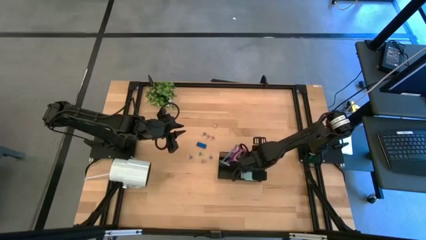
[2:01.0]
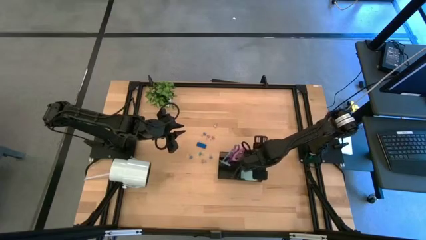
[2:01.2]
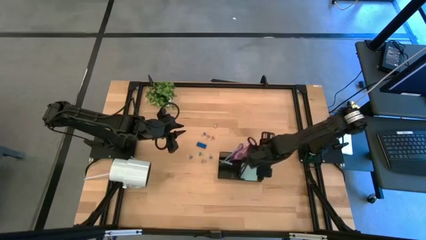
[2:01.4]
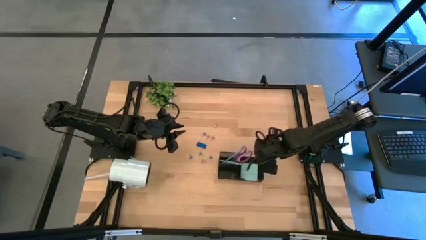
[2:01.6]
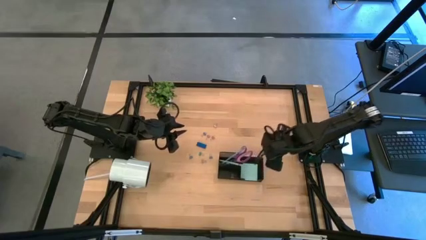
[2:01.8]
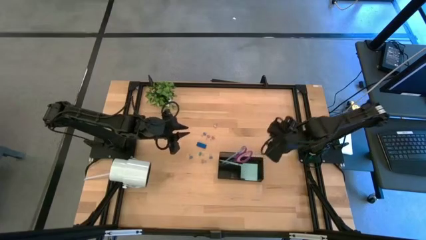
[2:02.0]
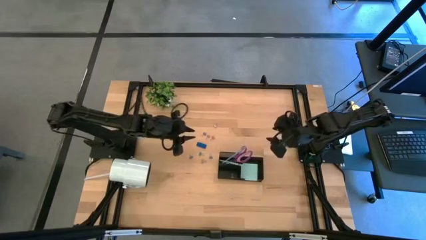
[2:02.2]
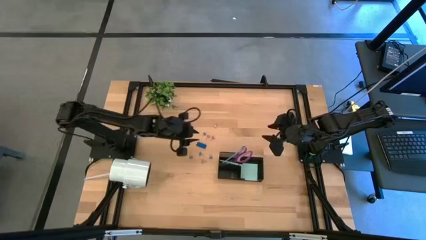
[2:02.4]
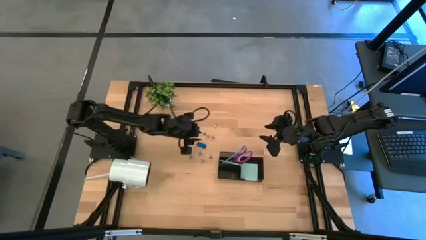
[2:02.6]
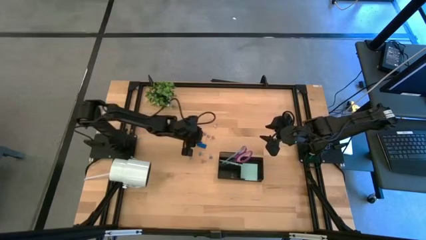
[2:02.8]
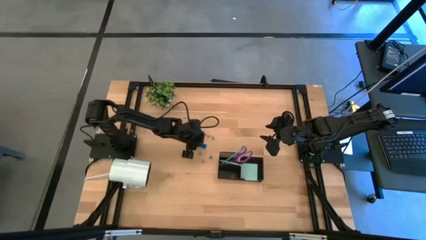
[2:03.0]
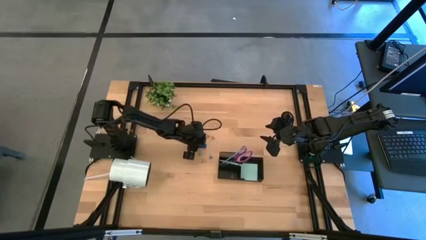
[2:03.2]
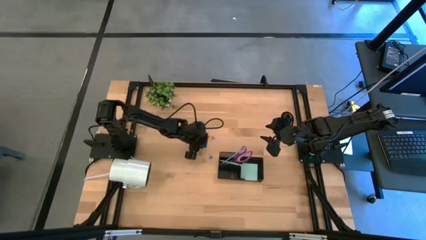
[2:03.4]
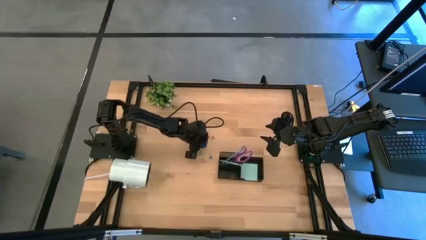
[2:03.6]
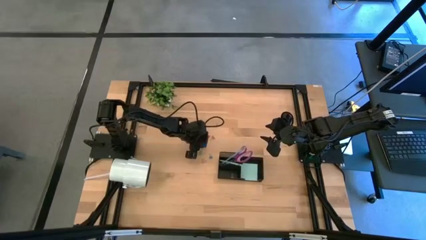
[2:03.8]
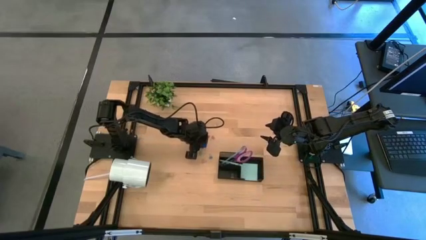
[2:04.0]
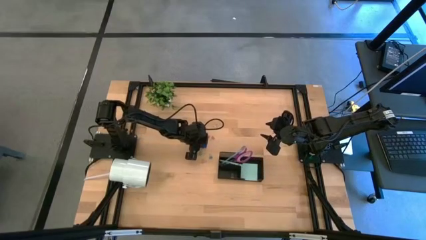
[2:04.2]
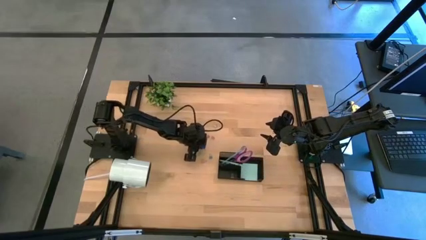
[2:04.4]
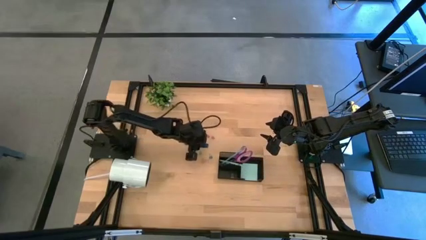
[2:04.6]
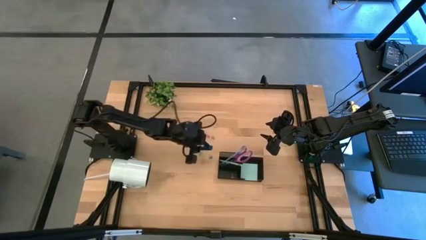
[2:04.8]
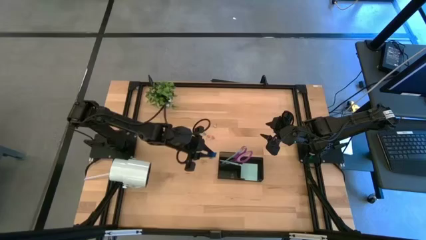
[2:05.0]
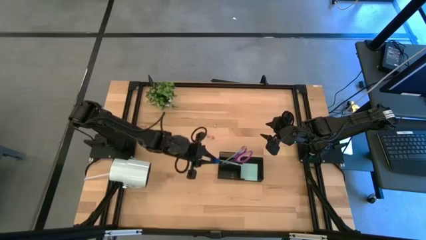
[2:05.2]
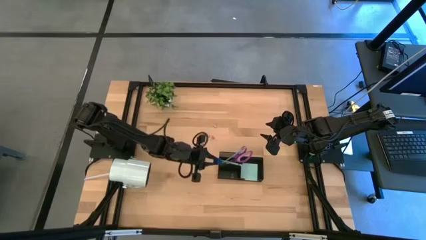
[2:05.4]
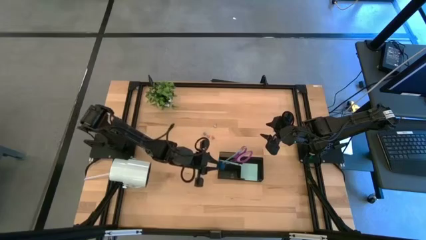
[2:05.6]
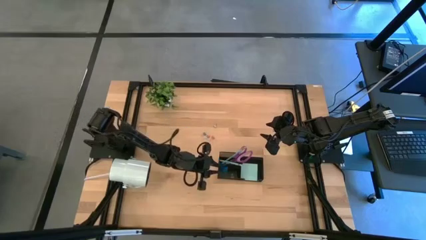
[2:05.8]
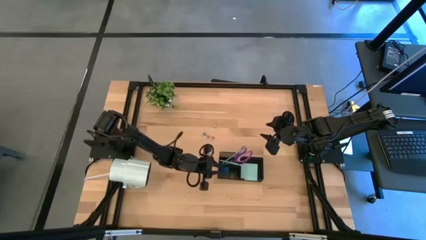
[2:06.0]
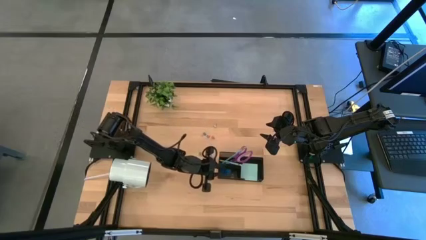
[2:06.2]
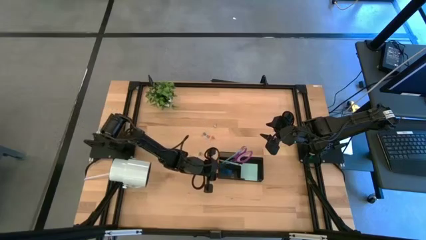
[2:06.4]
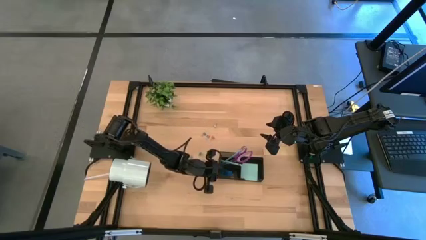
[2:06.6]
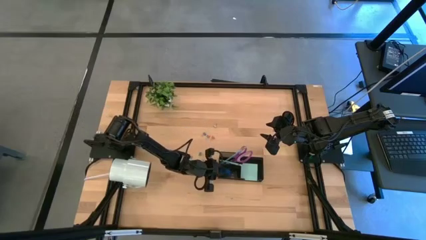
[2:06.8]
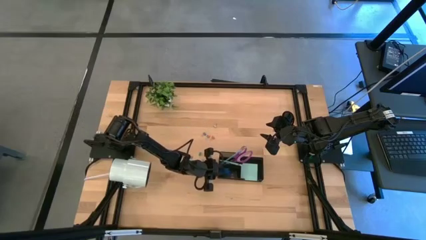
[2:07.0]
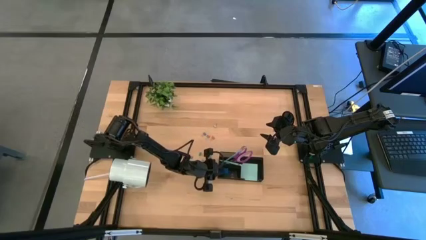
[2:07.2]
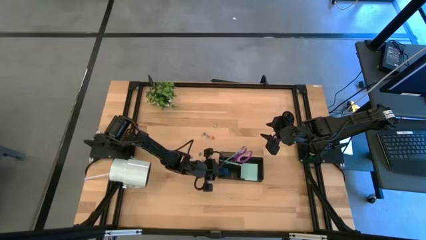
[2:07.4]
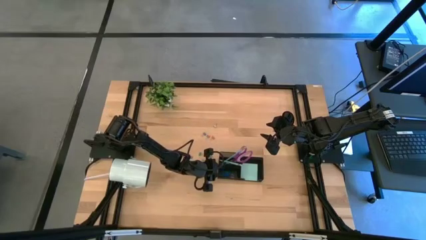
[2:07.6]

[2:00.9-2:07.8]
Task: Pick and place office supplies into organizer
Put the blue eraser into the desk organizer

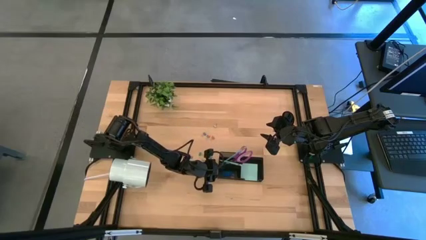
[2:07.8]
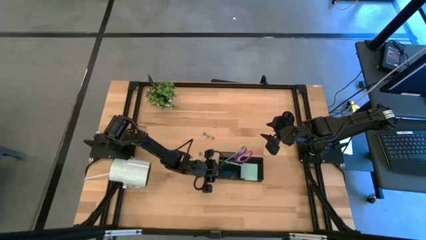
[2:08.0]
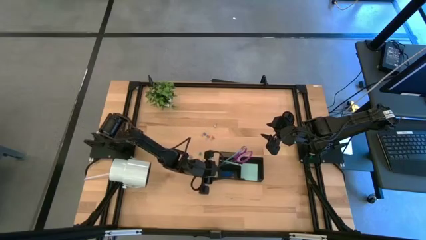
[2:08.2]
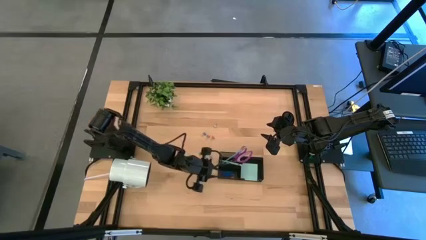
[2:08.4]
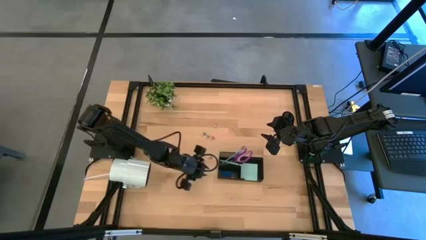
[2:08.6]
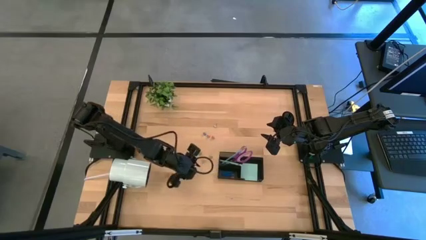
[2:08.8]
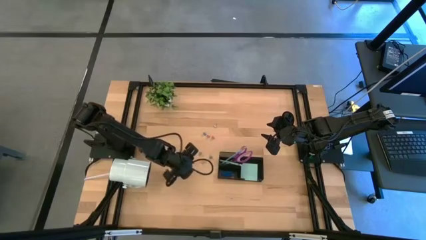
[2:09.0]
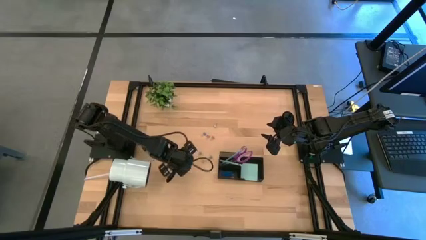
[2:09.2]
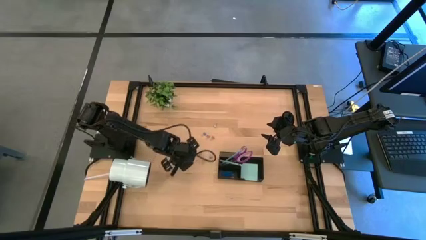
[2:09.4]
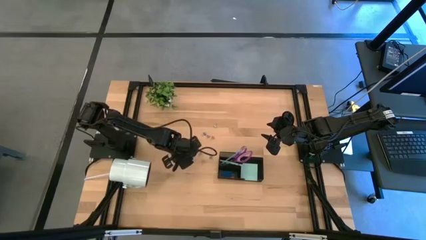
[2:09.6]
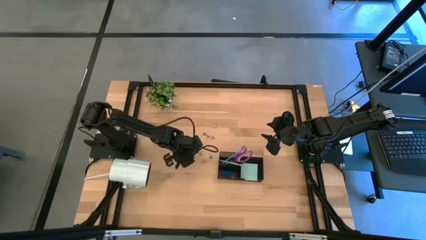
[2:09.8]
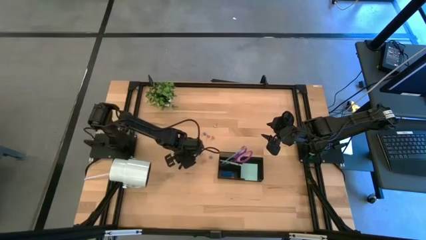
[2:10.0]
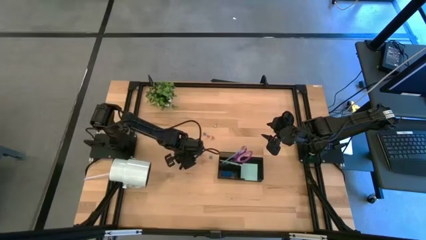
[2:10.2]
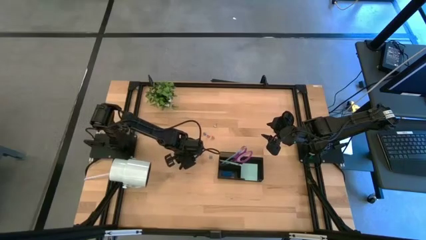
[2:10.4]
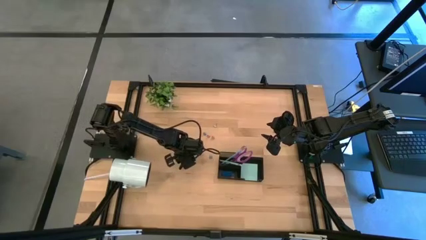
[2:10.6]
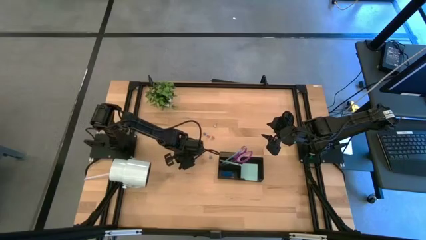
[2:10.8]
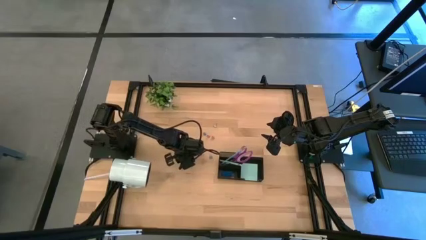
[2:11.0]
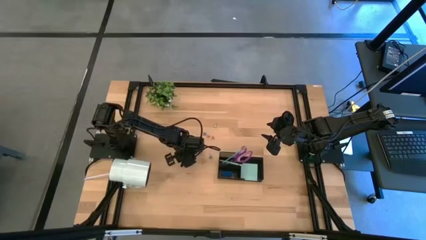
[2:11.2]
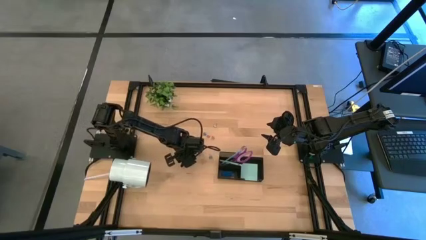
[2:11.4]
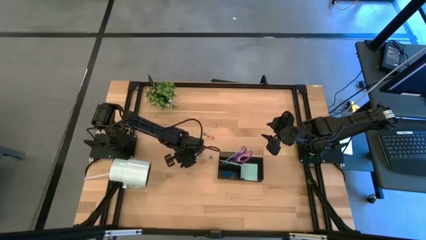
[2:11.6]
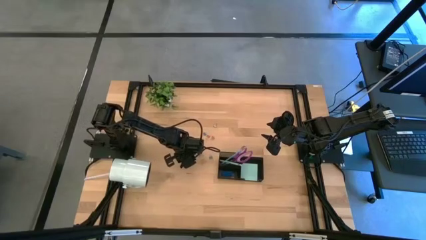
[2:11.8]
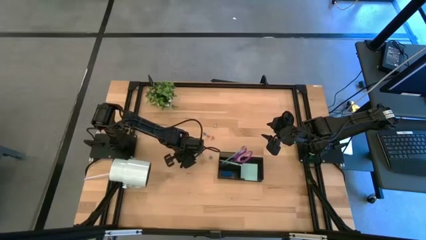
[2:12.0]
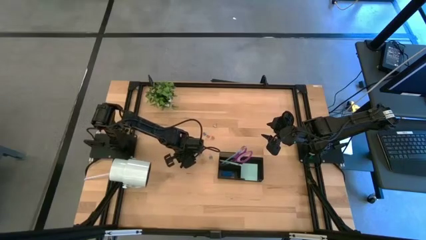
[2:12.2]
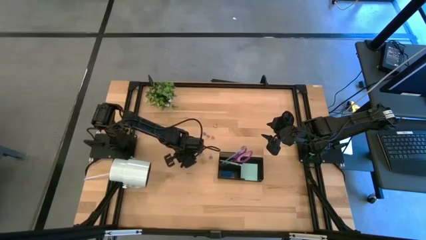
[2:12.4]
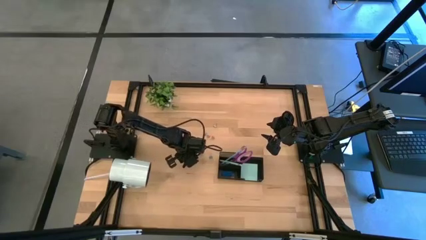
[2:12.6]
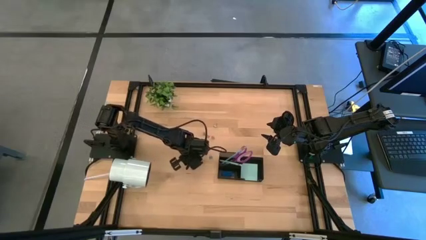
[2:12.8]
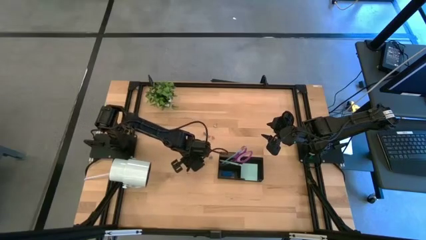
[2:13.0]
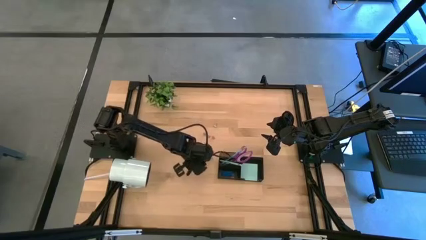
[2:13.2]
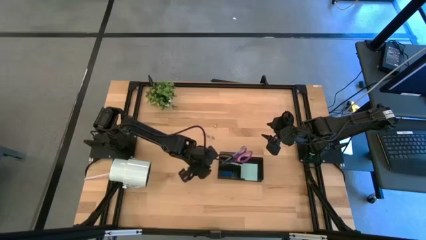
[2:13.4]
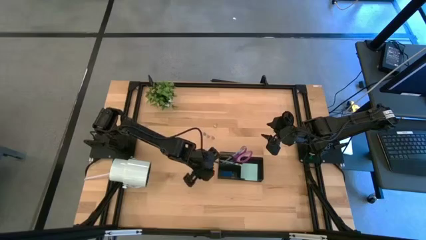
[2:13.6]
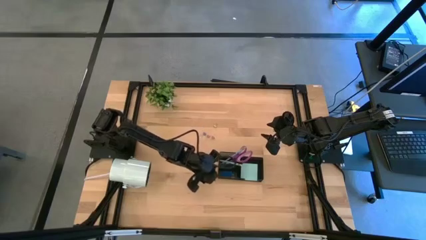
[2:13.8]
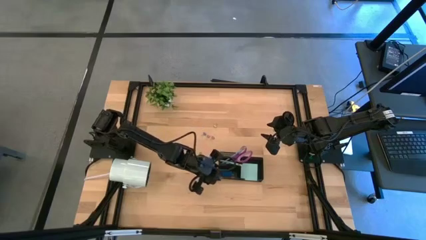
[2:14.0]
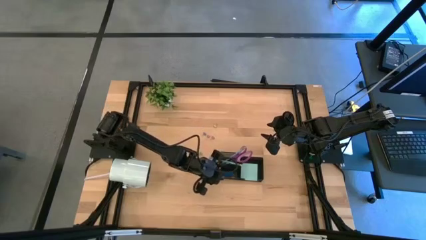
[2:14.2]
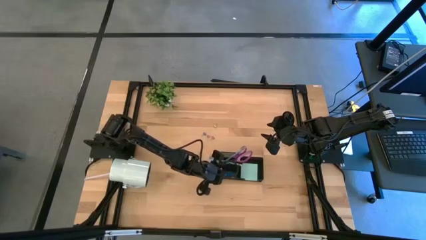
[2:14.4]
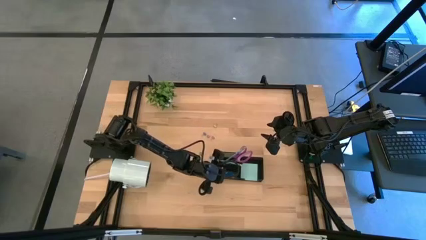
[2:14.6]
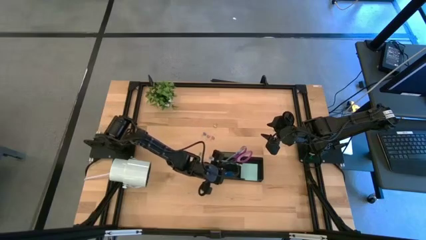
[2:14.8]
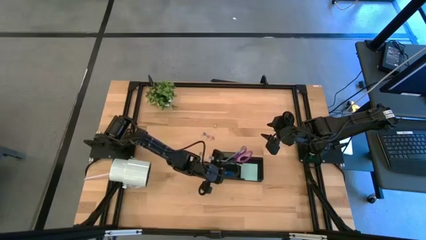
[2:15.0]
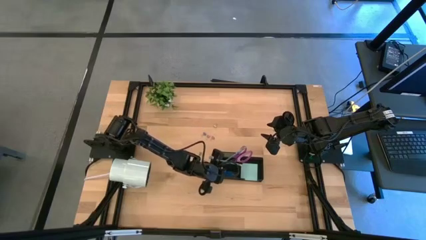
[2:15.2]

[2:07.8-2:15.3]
Put the blue binder clip into the desk organizer

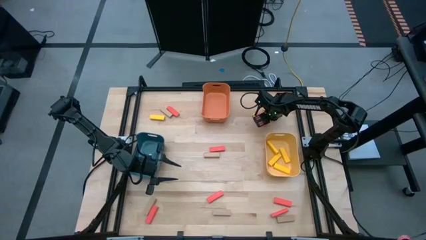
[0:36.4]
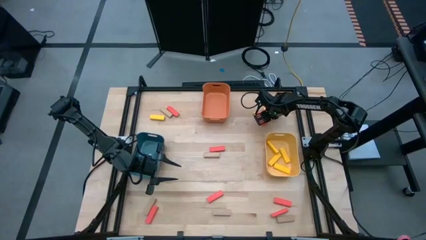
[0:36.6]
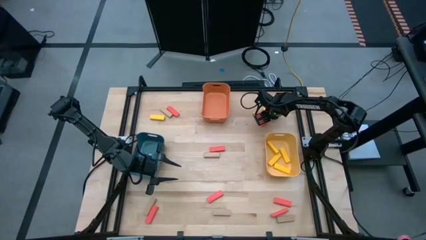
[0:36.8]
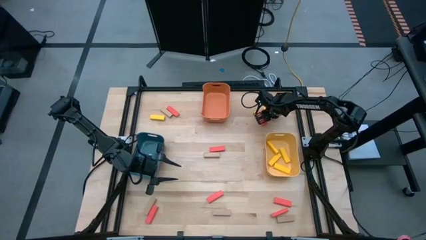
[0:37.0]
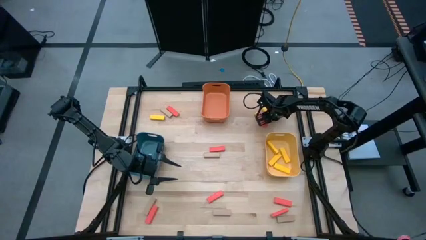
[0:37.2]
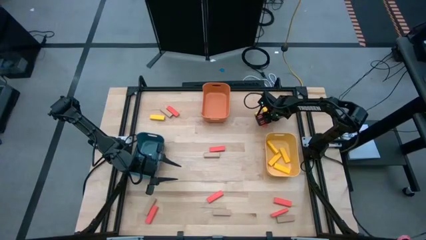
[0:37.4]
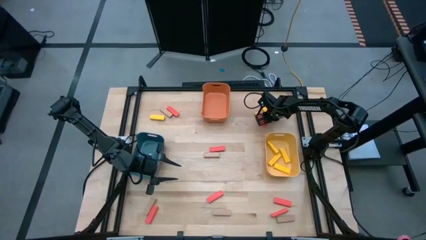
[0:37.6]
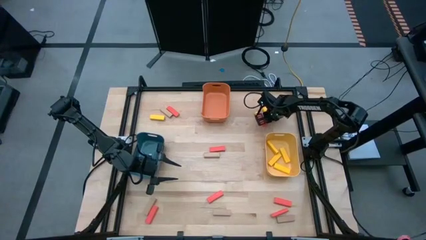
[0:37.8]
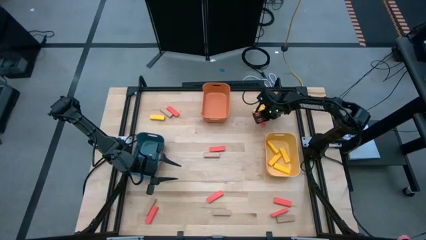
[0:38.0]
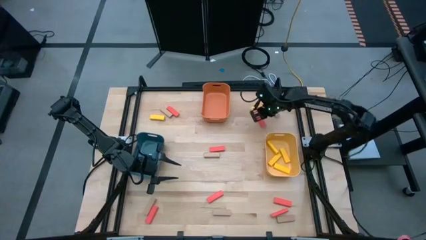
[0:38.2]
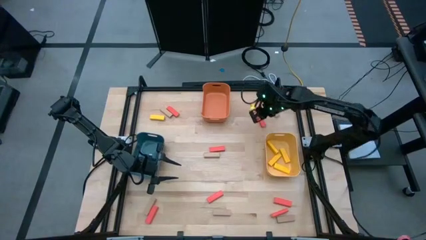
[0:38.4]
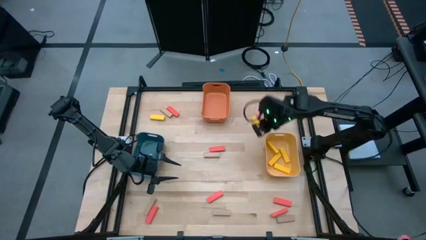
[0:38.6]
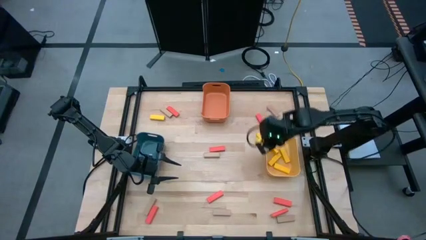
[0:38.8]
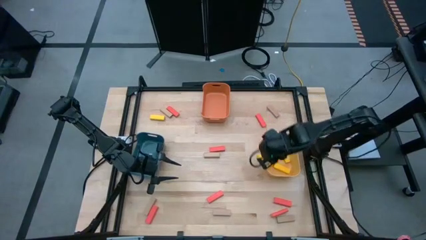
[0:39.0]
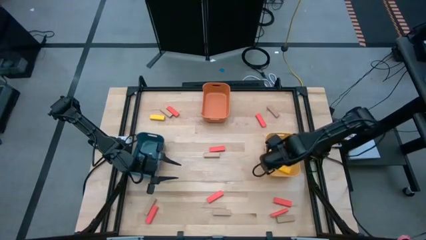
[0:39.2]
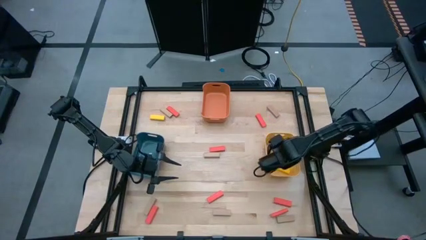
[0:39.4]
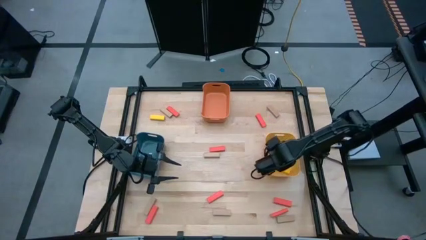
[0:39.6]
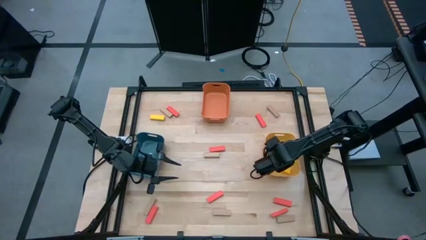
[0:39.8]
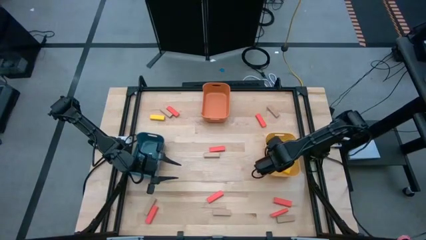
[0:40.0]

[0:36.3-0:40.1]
Task: Sort blocks
Put the right yellow block into the yellow bin
